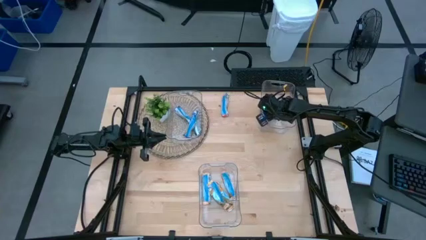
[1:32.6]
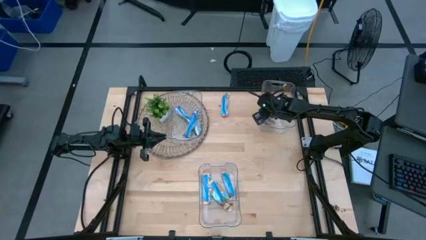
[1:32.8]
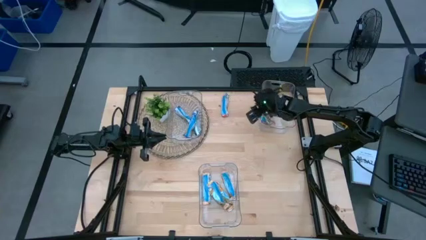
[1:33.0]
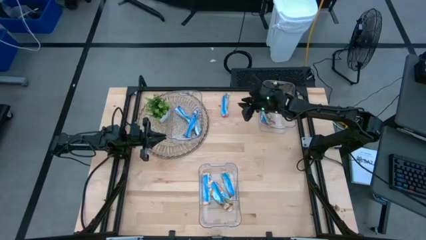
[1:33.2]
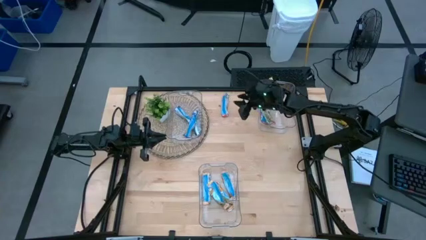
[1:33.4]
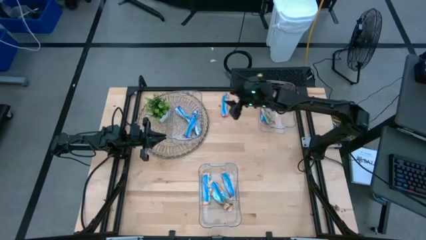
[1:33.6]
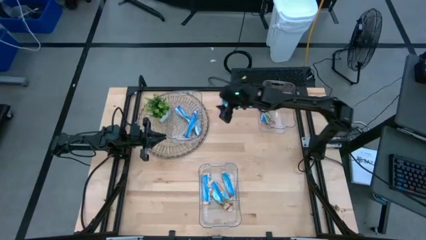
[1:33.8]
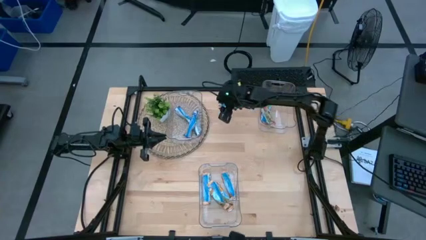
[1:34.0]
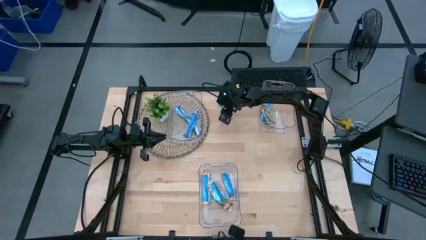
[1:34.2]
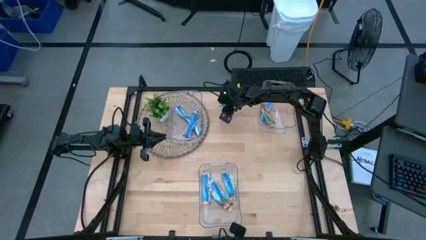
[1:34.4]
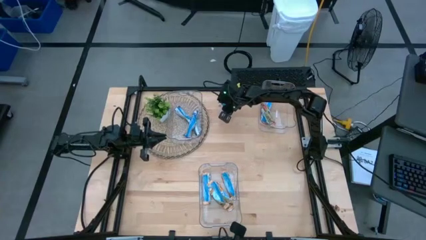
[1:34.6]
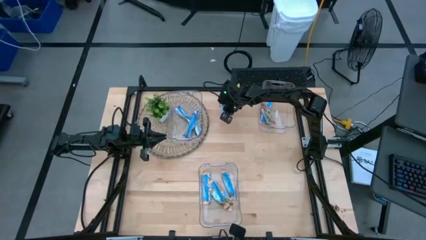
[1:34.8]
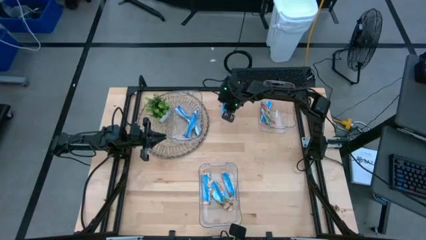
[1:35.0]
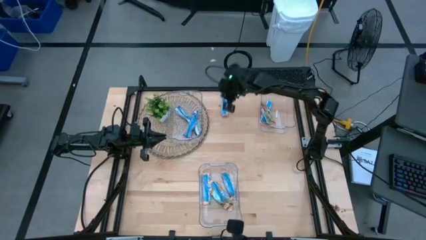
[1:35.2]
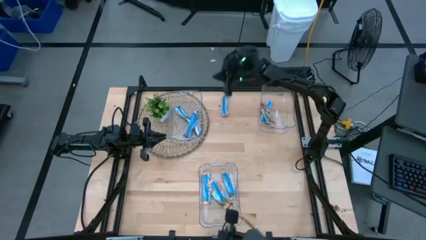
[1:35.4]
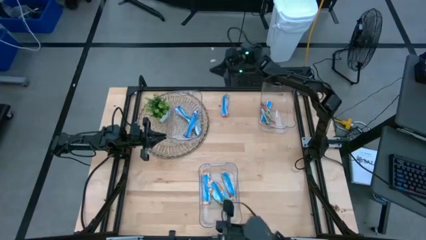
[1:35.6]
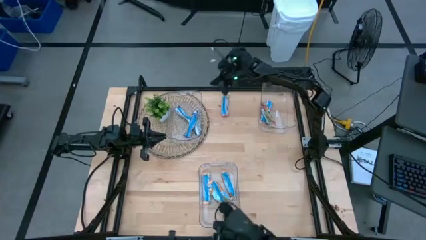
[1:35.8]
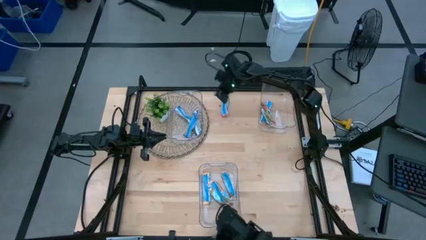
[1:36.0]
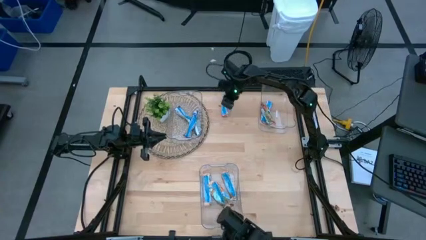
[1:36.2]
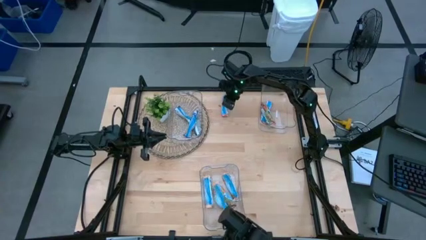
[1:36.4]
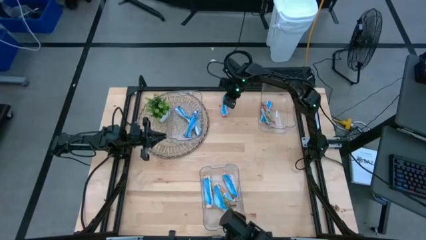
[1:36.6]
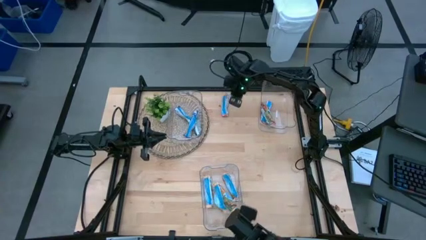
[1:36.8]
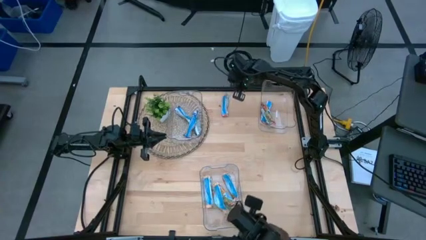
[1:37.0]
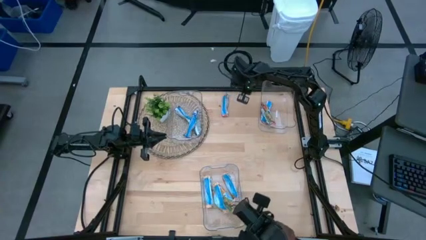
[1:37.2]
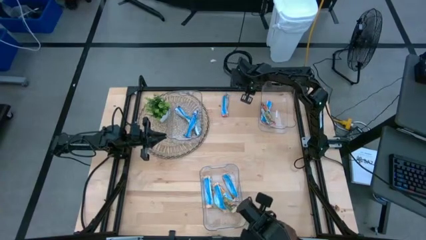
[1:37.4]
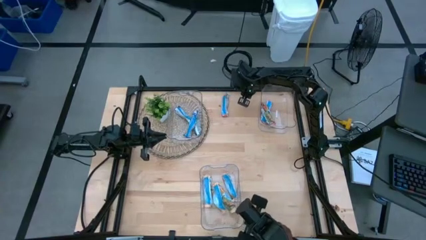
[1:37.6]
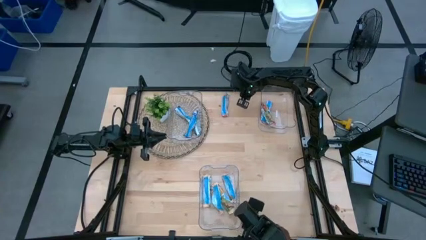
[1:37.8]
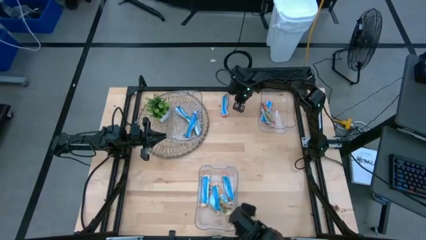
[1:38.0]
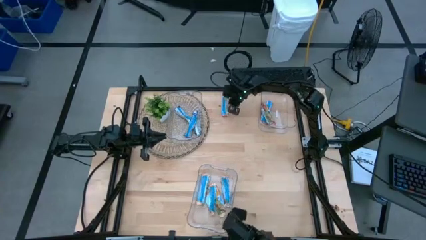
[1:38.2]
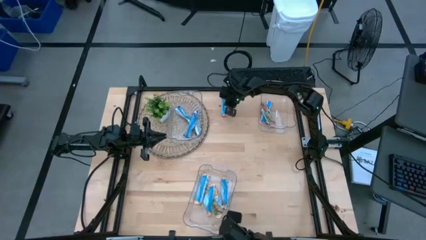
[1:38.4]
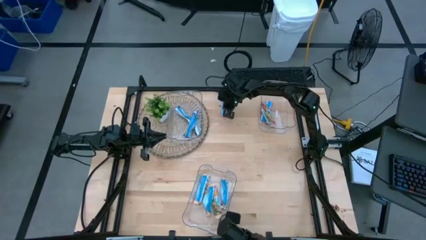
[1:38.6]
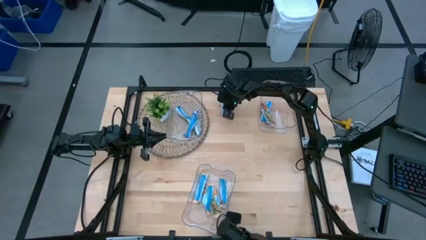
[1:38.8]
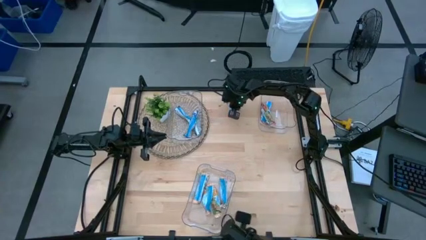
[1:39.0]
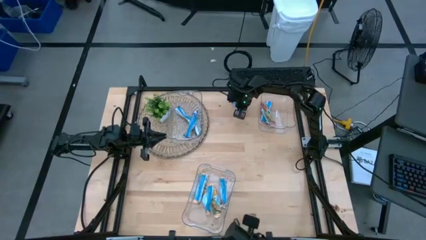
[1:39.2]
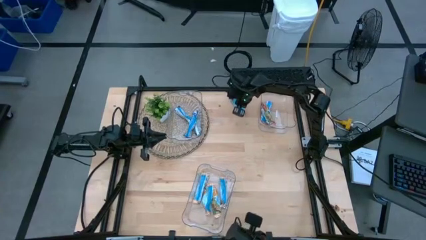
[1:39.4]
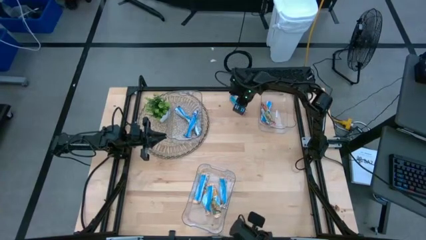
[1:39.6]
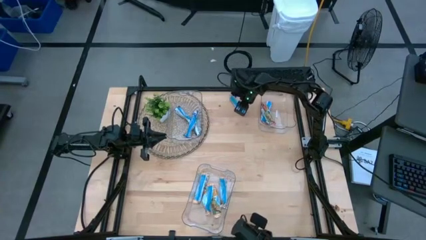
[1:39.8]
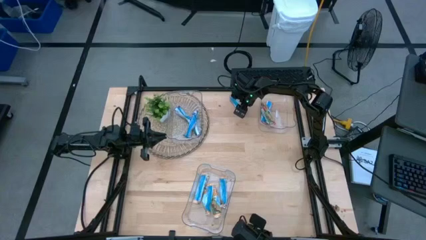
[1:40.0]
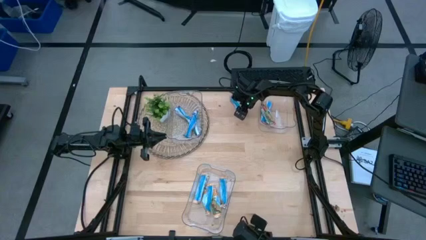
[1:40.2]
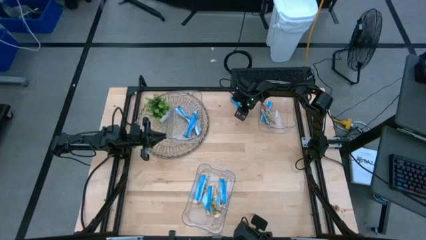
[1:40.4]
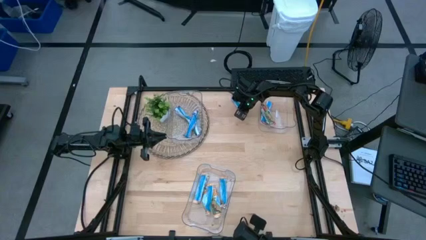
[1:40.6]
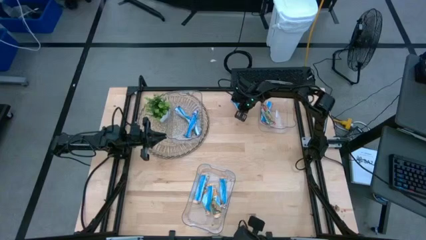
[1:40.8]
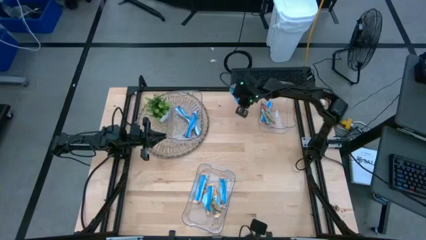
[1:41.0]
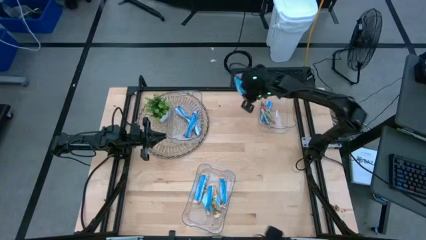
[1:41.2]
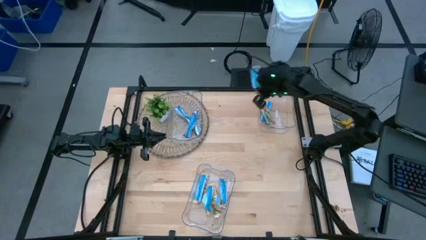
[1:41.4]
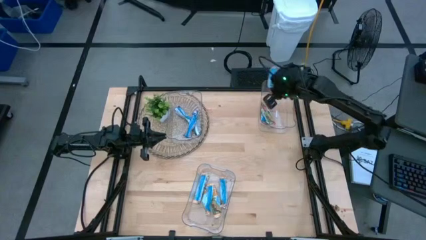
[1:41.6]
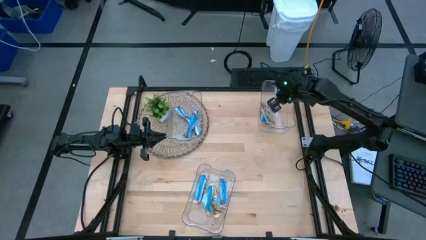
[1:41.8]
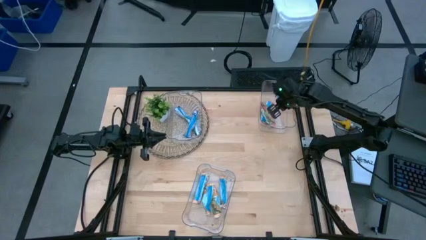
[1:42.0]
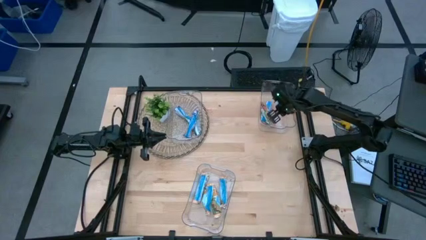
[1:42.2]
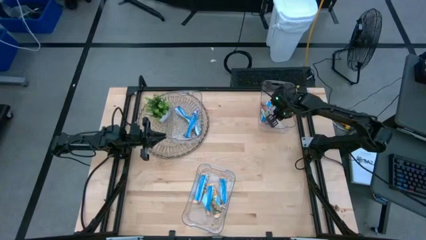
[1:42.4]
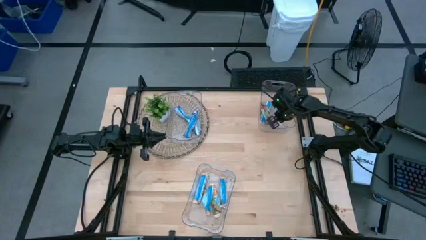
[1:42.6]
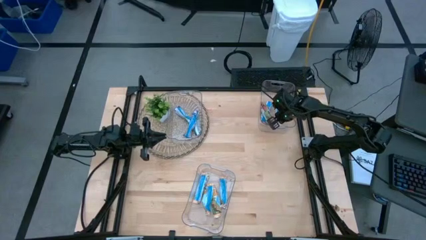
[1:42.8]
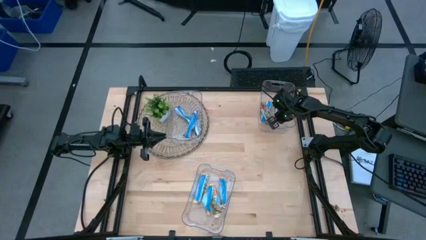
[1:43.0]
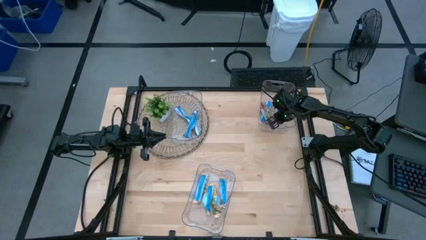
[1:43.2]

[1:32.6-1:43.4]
Task: Pick and place Granola Bars by type
Put the red granola bar into the top right transparent bin
